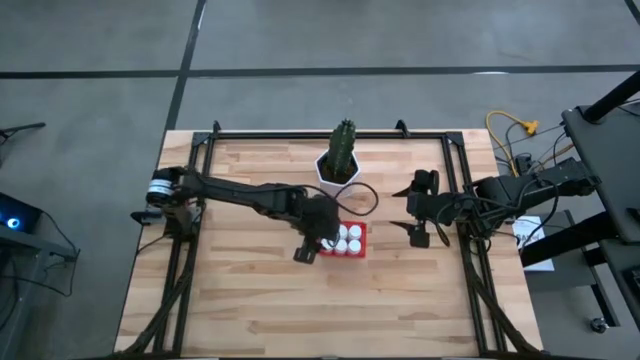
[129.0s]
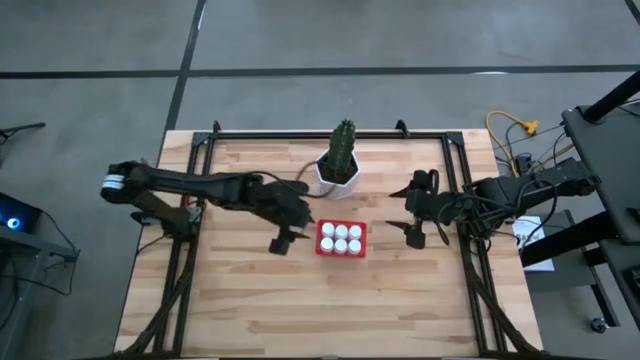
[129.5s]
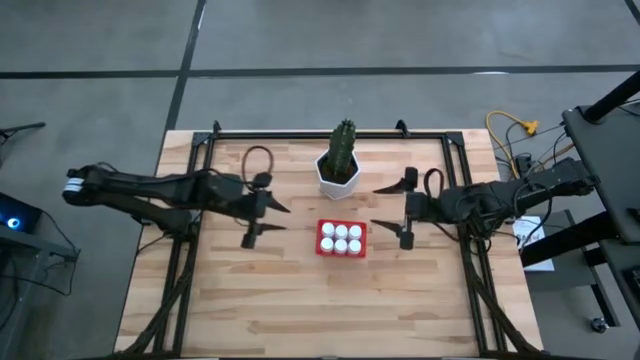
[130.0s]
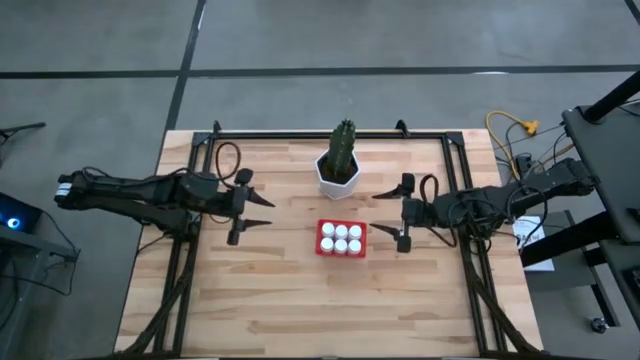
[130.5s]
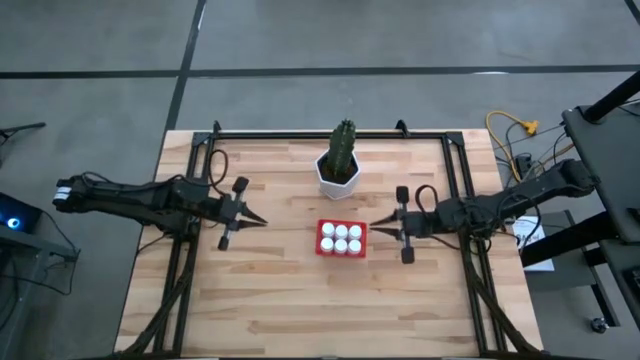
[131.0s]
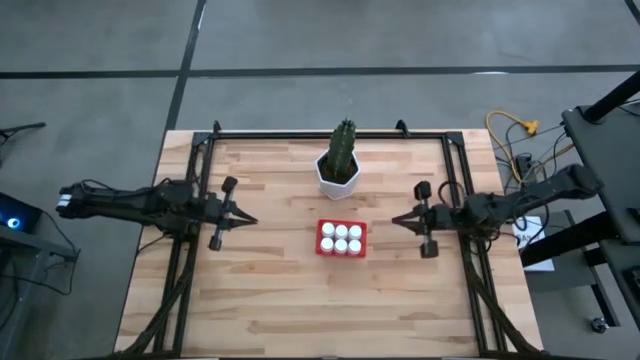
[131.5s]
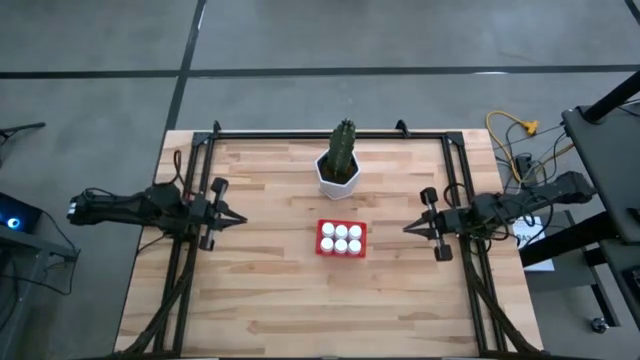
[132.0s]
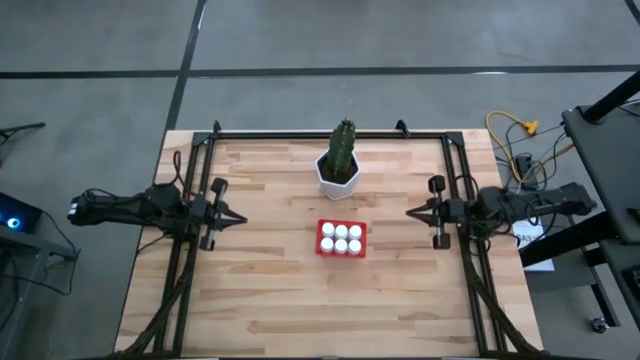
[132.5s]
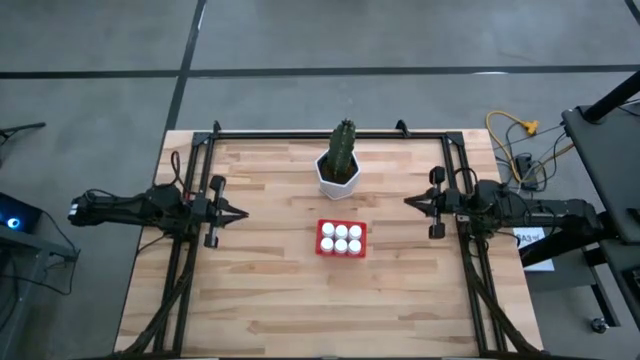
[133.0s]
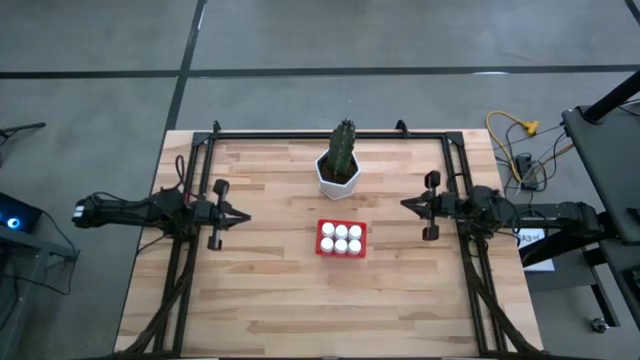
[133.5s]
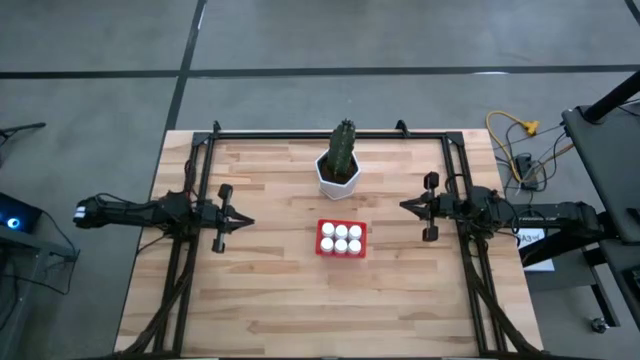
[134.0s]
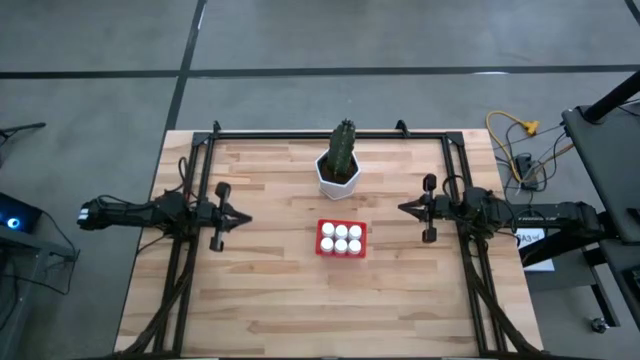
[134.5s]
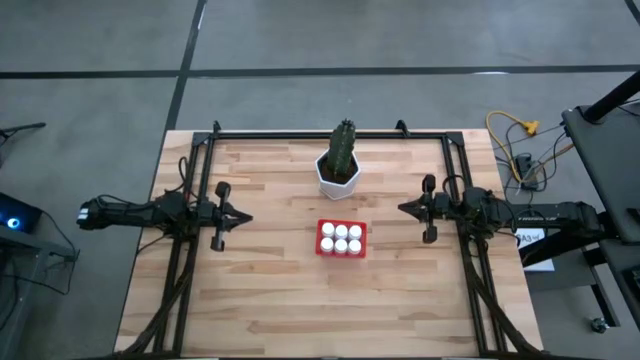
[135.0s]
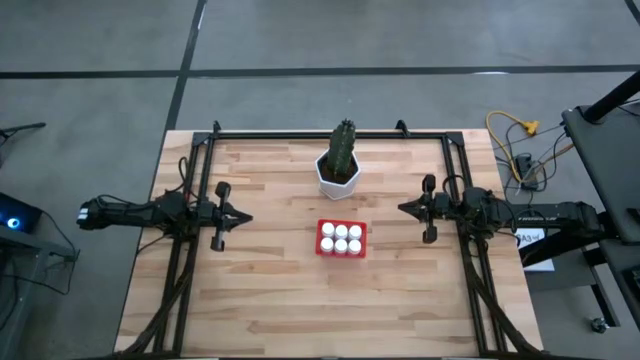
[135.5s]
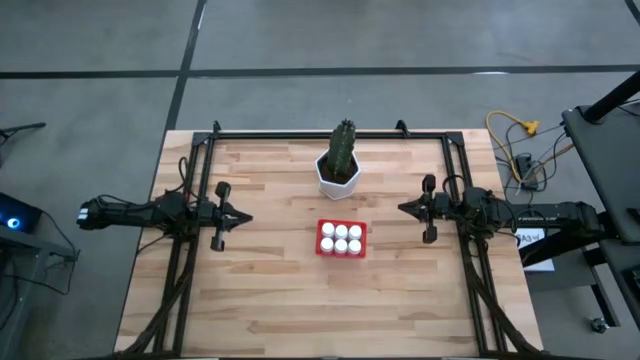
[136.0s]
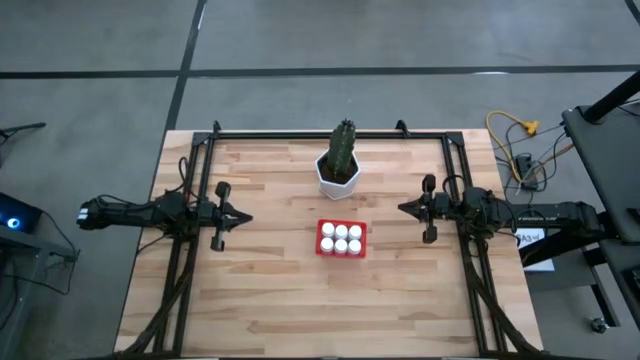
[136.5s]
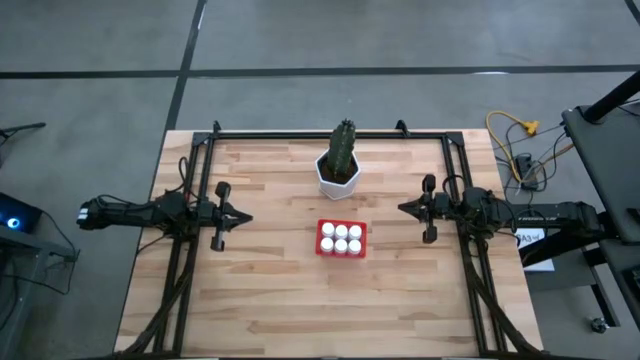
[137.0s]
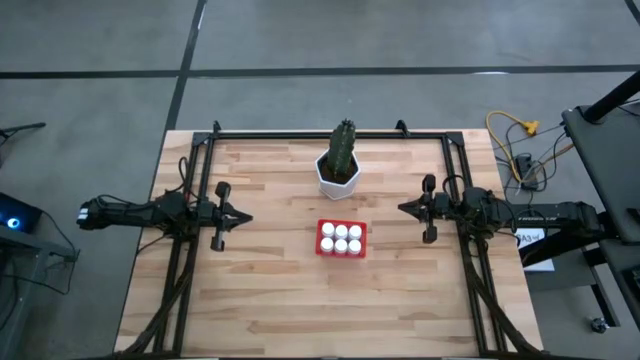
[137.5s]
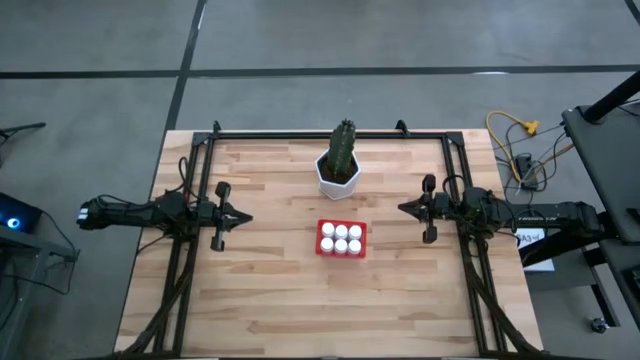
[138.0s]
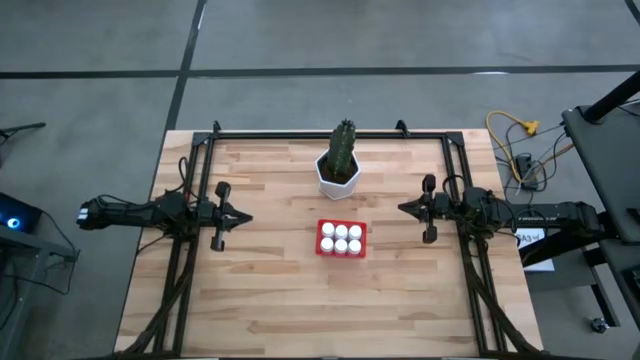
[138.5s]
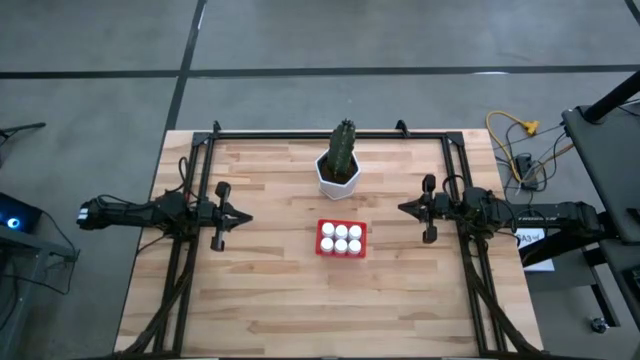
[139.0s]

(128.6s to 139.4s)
Task: Pick and place pill bottles into a basket
Return to Home Position

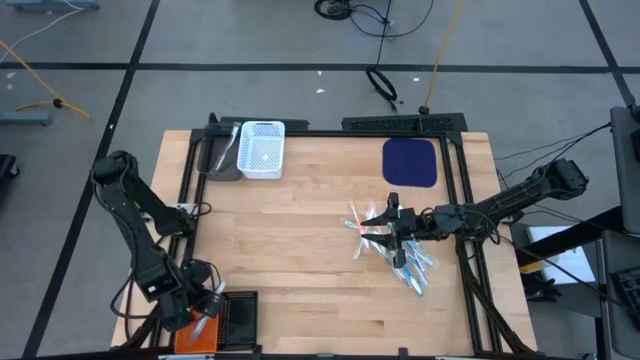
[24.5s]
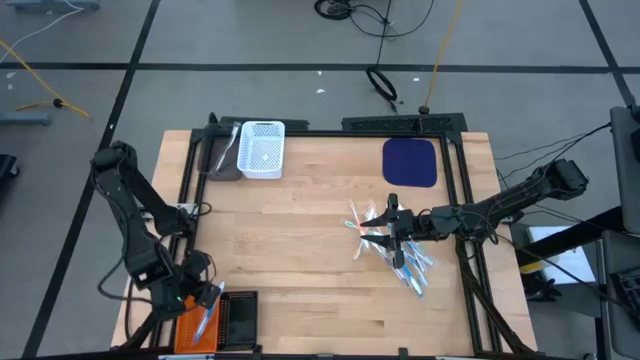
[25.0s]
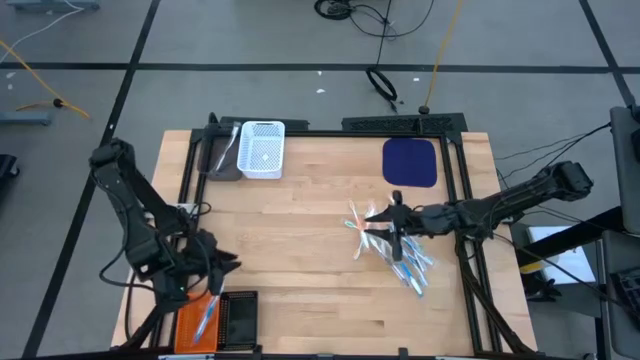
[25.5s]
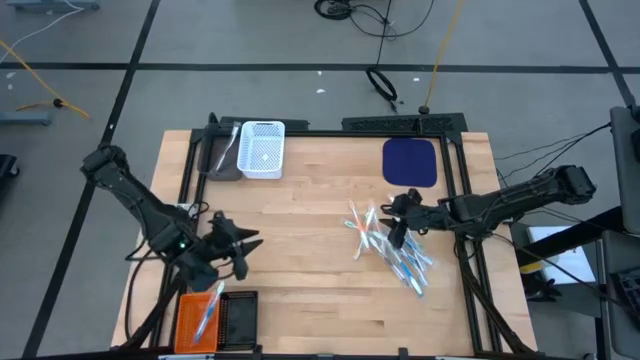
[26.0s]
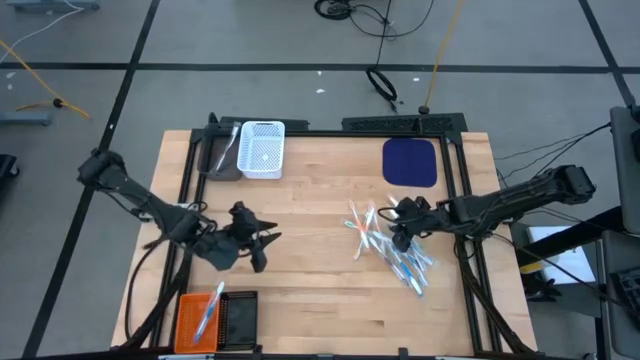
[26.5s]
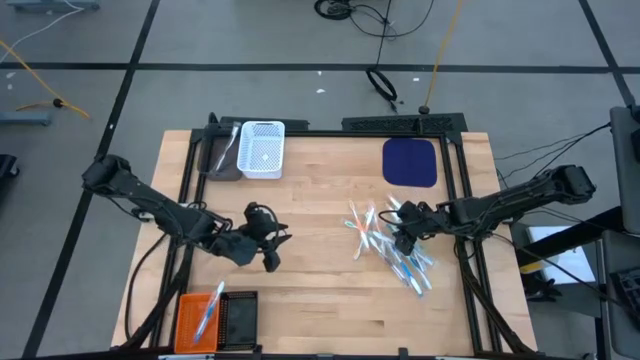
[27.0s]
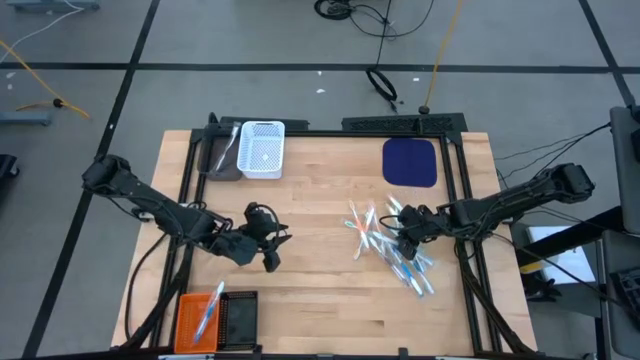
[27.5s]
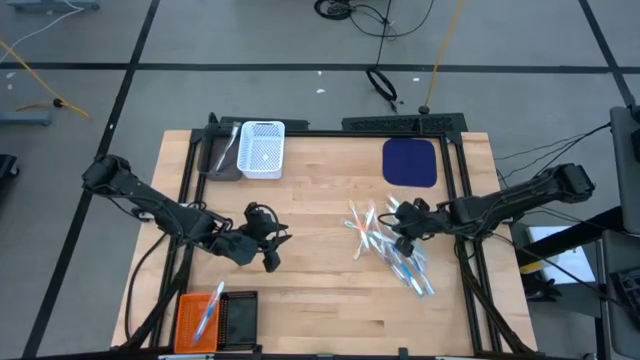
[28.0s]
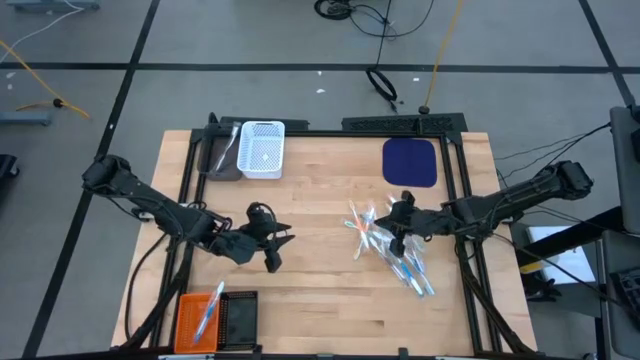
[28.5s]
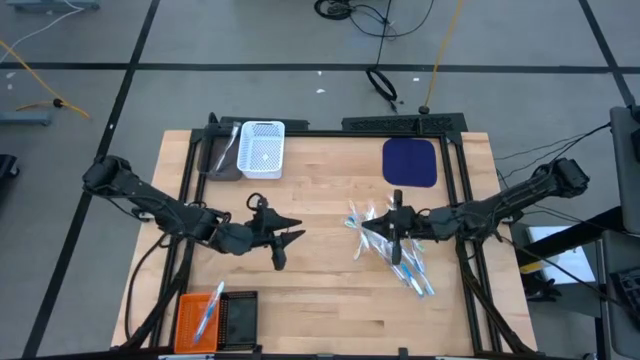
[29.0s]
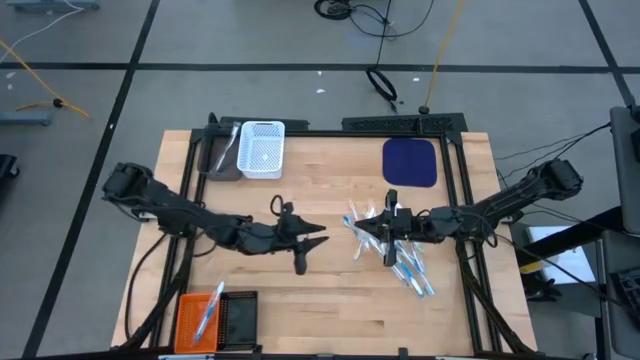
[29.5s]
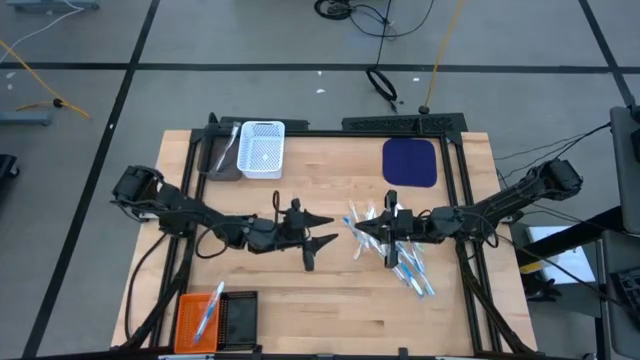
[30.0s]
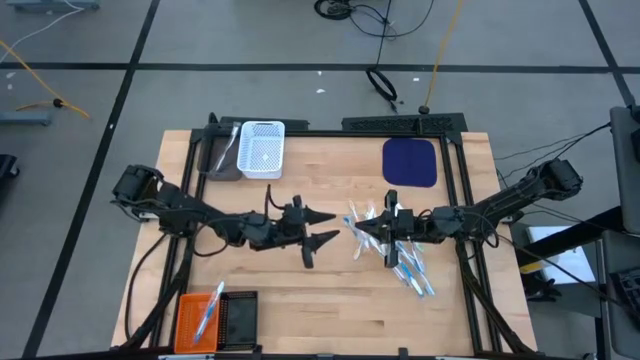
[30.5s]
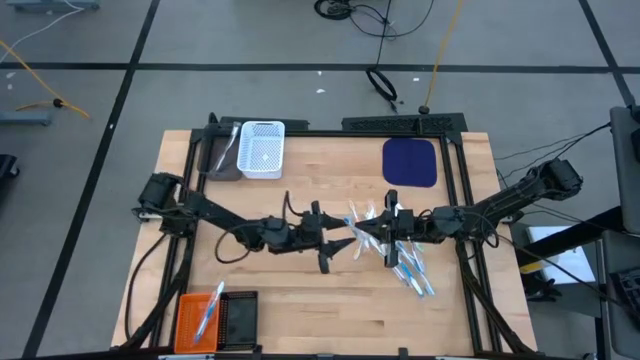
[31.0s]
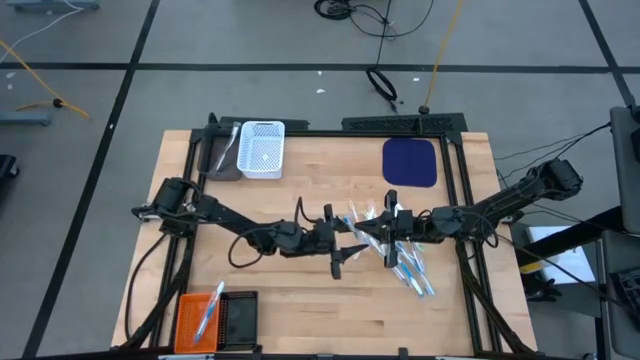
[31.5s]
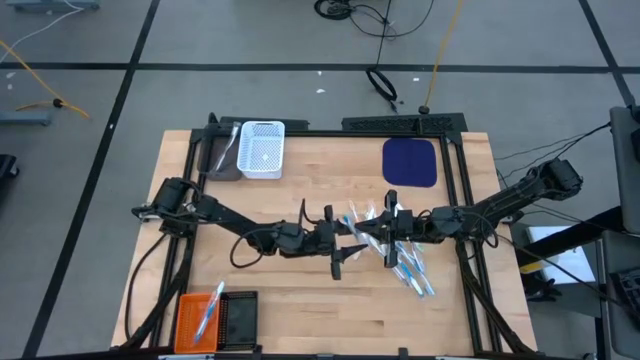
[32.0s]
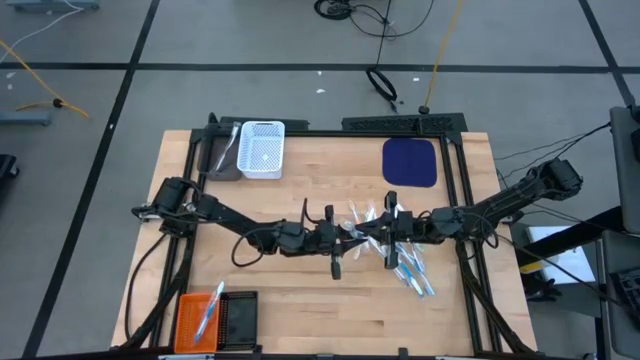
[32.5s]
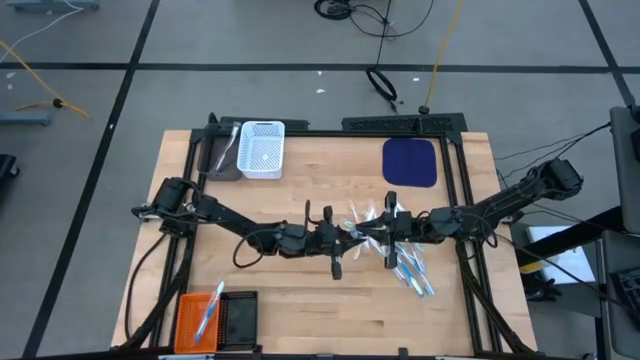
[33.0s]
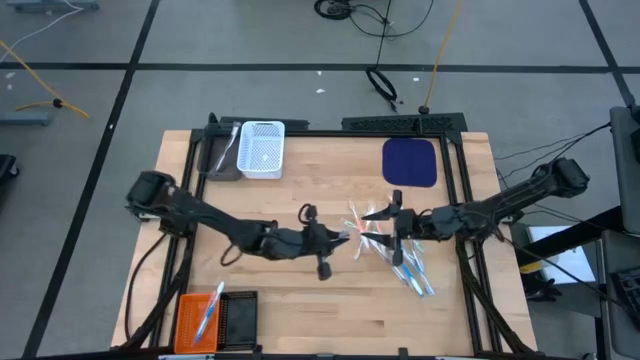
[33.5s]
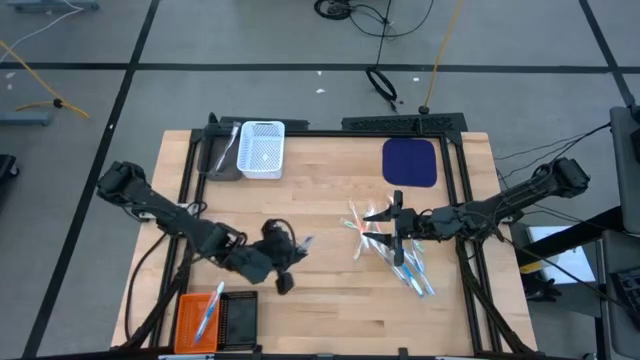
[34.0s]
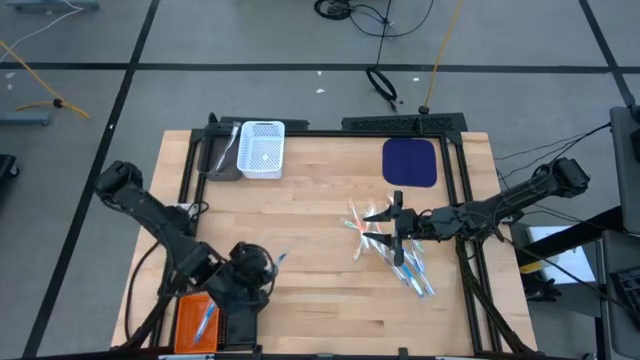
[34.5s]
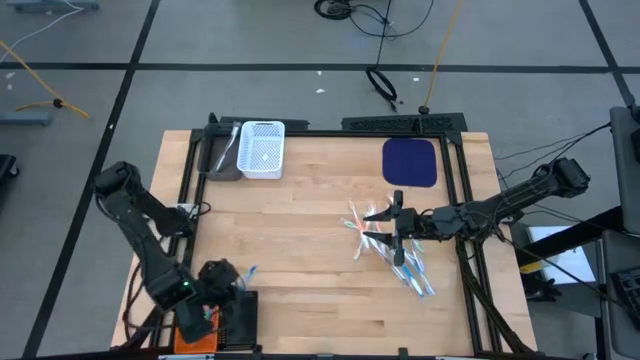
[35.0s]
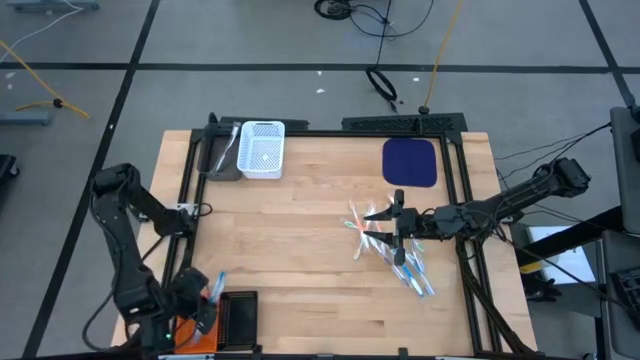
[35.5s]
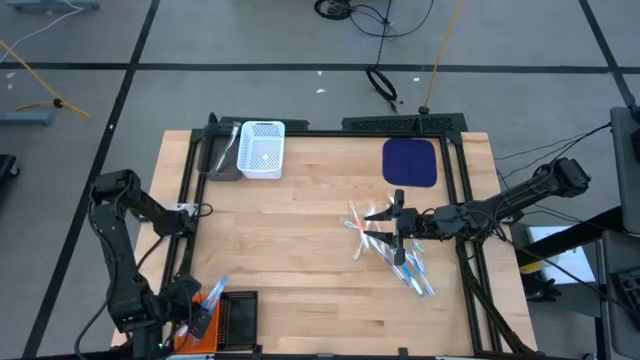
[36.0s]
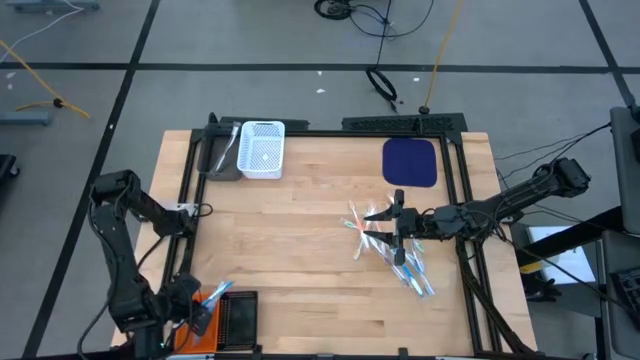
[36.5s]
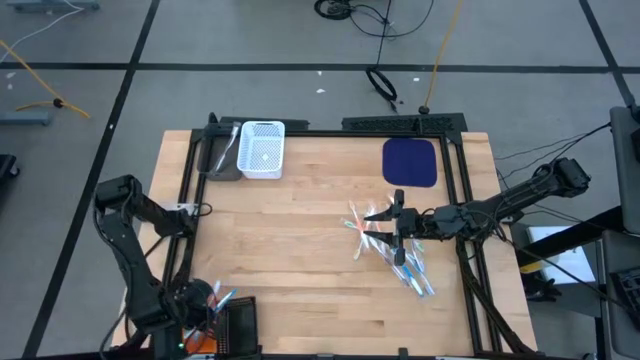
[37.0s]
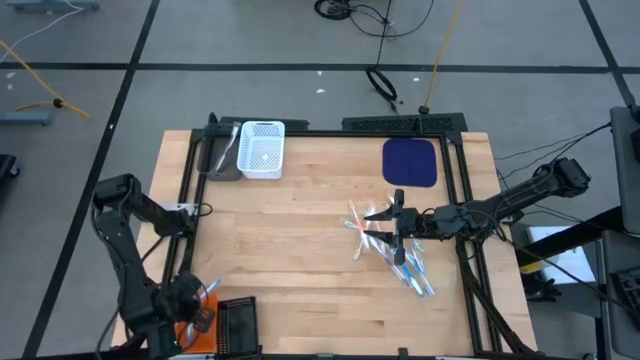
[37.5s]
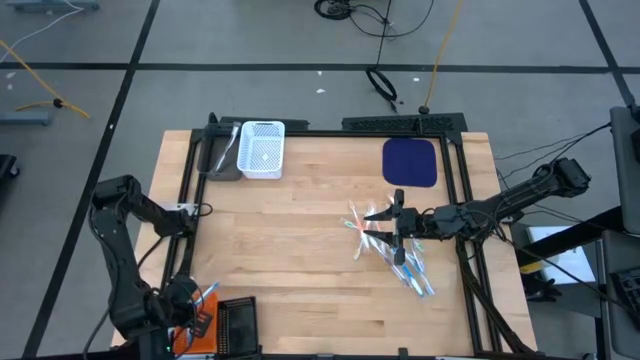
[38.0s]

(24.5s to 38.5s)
Task: Pick & Place Toothbrushes
Put the blue toothbrush into the orange bin
